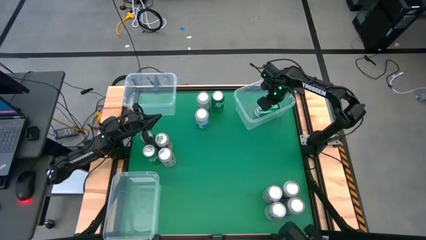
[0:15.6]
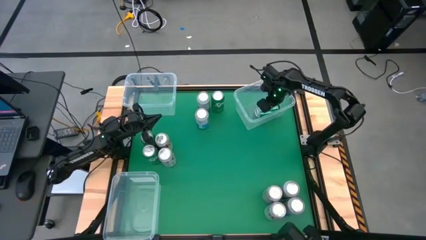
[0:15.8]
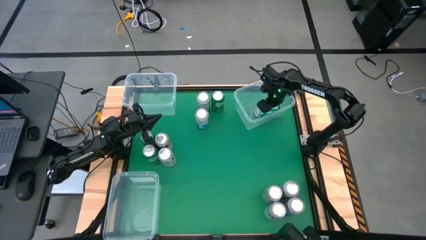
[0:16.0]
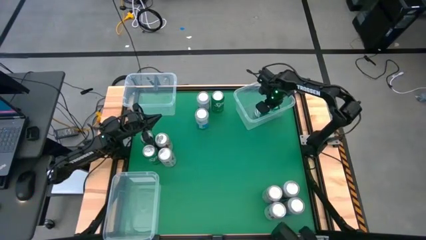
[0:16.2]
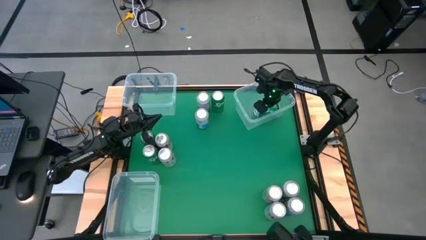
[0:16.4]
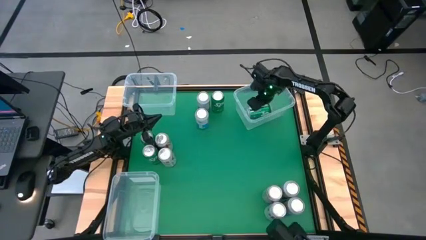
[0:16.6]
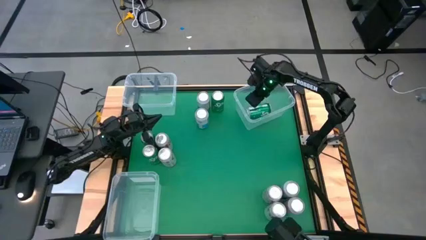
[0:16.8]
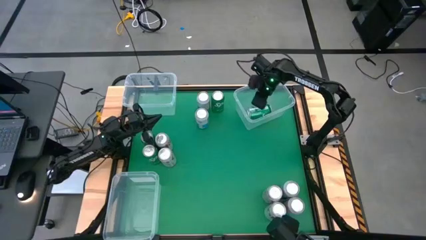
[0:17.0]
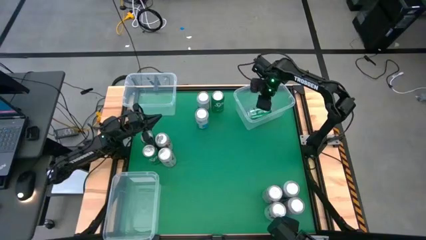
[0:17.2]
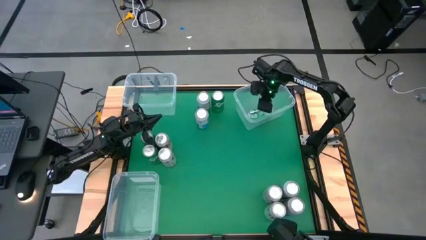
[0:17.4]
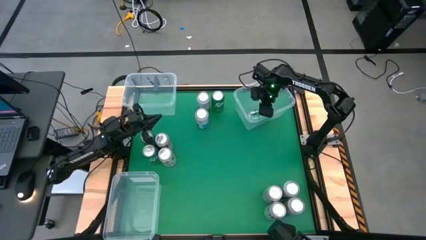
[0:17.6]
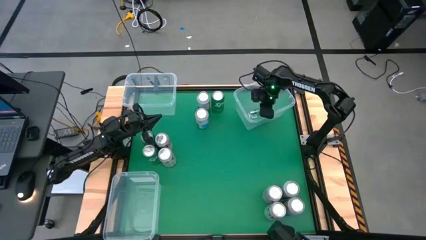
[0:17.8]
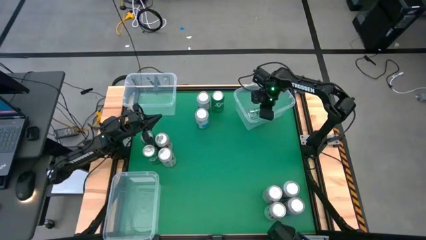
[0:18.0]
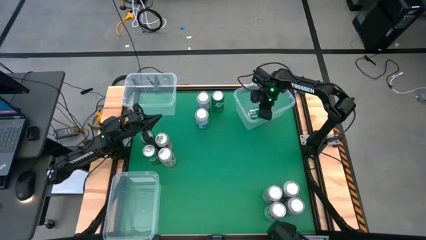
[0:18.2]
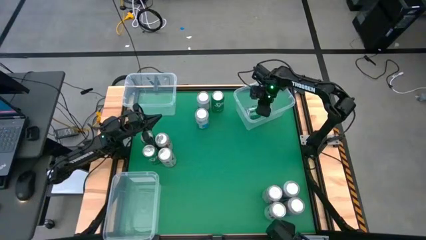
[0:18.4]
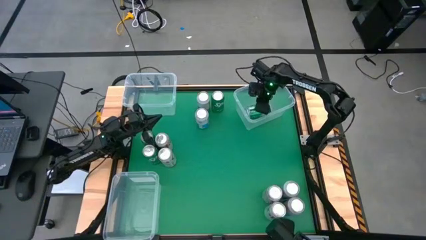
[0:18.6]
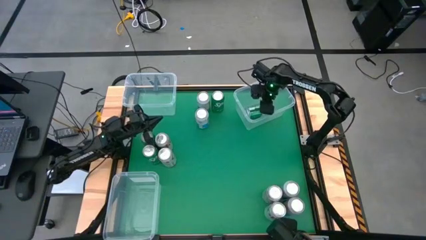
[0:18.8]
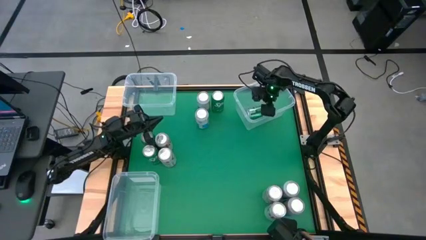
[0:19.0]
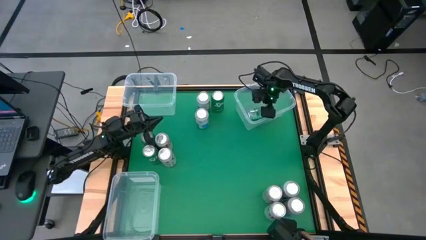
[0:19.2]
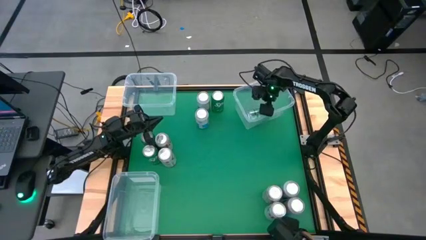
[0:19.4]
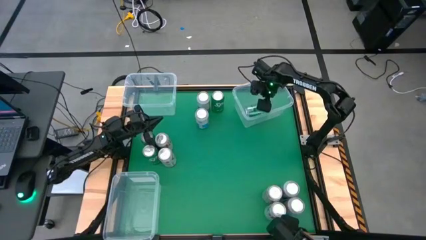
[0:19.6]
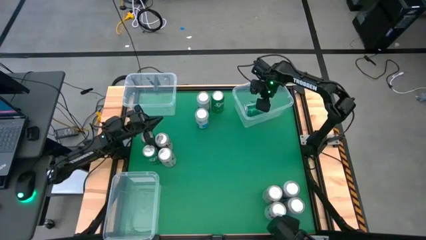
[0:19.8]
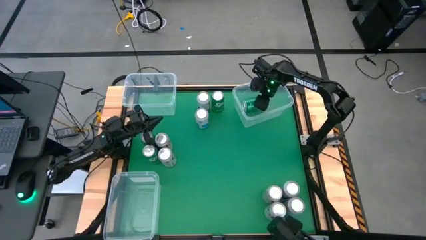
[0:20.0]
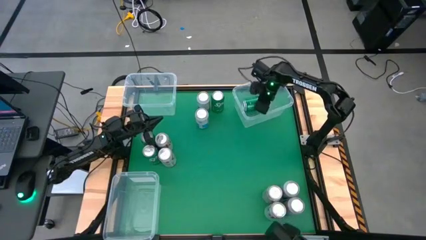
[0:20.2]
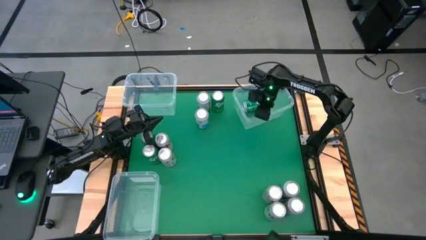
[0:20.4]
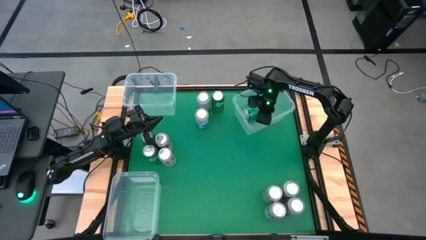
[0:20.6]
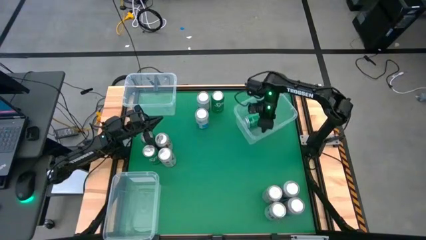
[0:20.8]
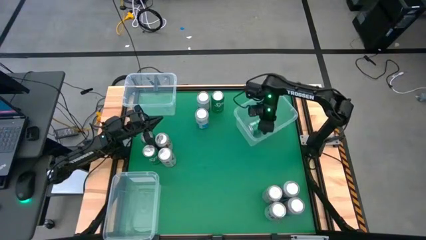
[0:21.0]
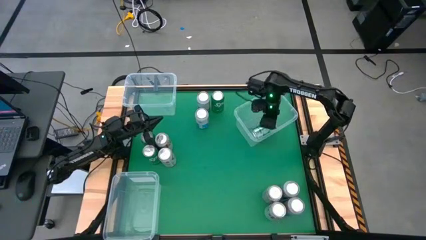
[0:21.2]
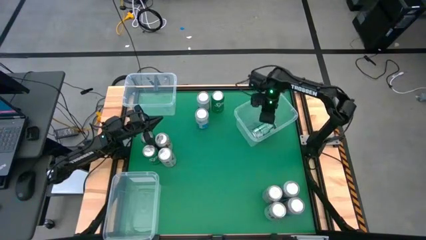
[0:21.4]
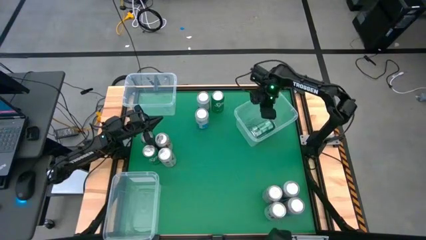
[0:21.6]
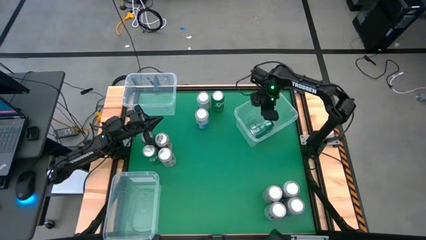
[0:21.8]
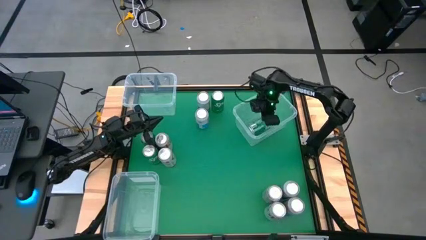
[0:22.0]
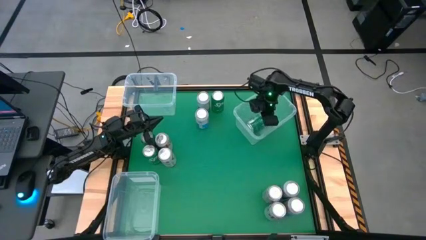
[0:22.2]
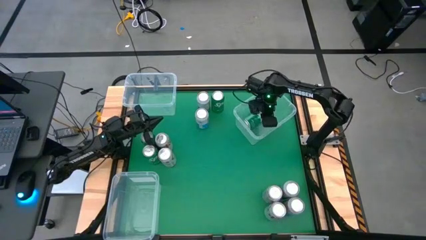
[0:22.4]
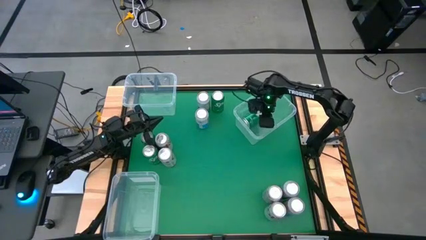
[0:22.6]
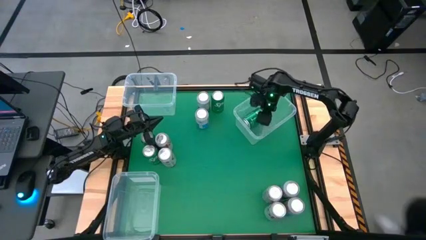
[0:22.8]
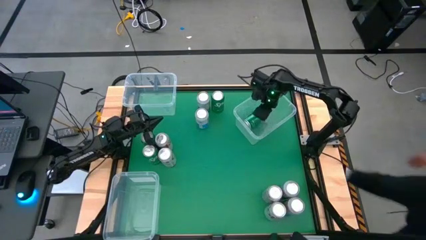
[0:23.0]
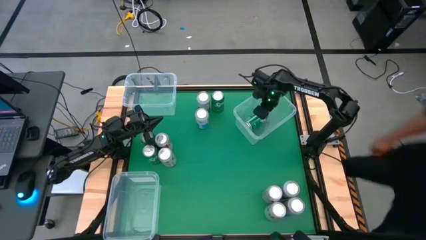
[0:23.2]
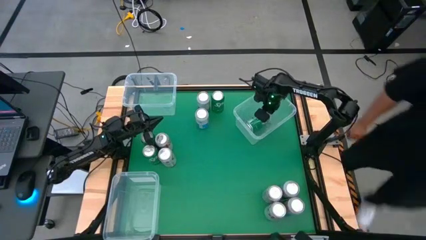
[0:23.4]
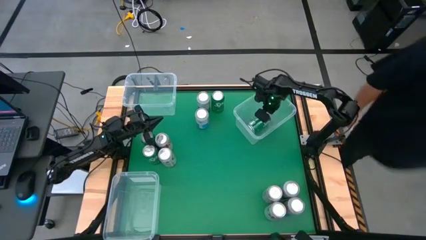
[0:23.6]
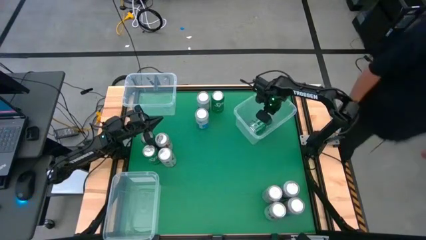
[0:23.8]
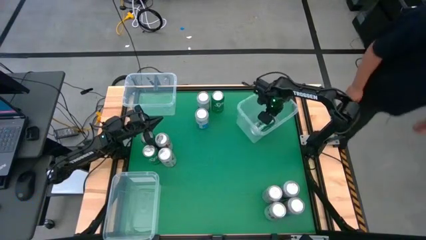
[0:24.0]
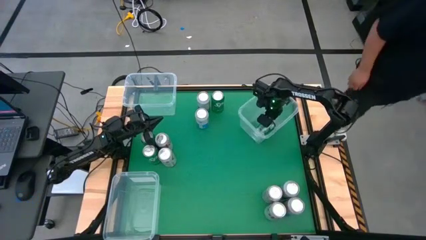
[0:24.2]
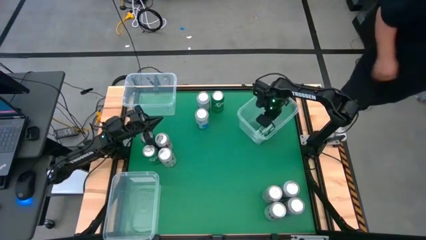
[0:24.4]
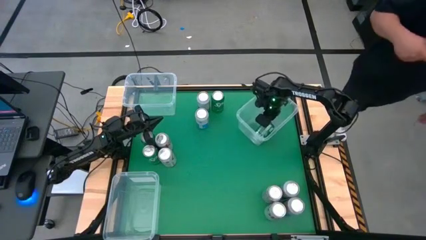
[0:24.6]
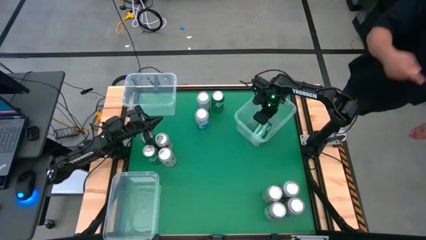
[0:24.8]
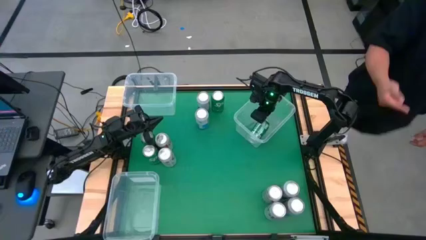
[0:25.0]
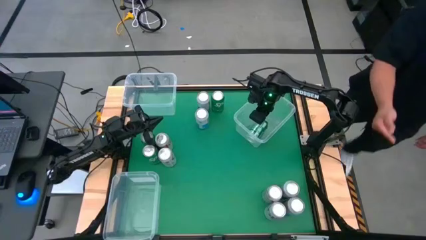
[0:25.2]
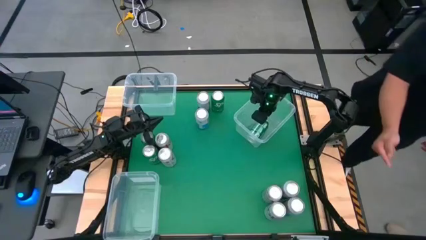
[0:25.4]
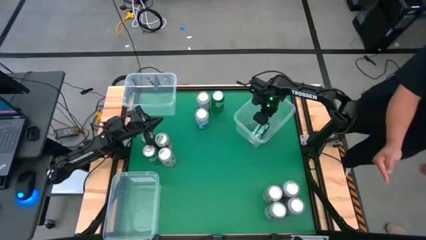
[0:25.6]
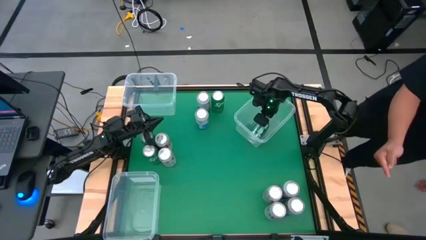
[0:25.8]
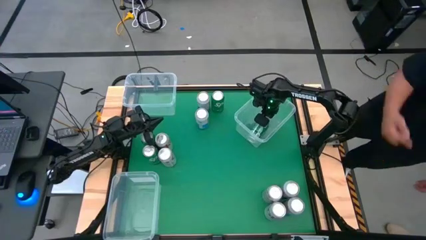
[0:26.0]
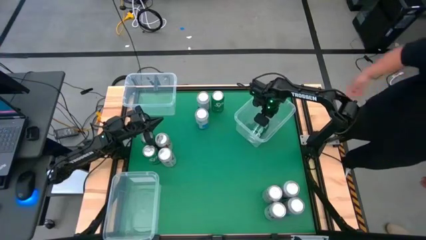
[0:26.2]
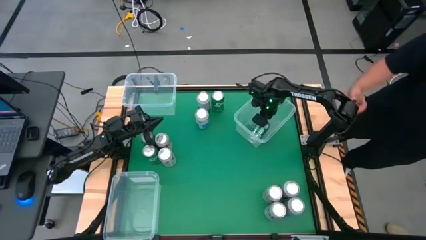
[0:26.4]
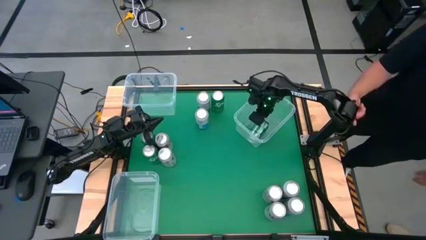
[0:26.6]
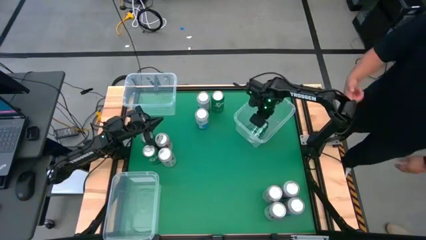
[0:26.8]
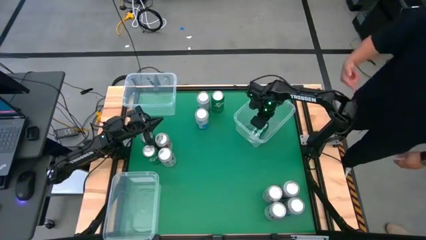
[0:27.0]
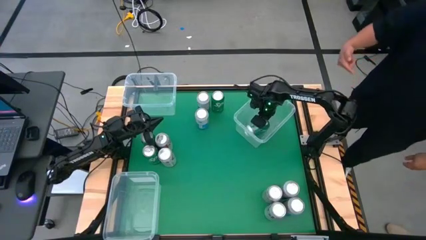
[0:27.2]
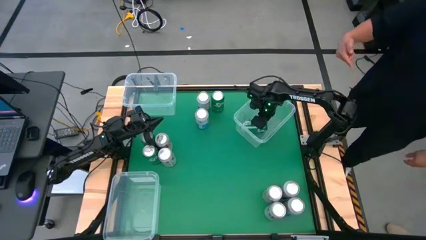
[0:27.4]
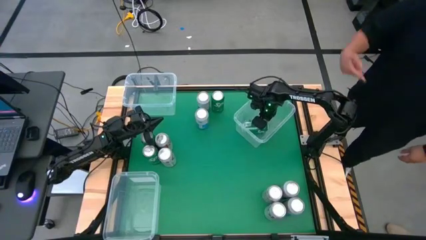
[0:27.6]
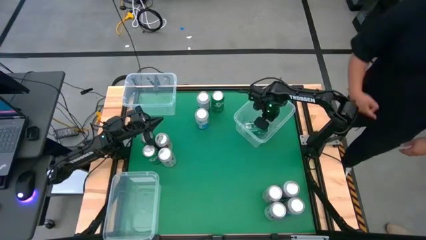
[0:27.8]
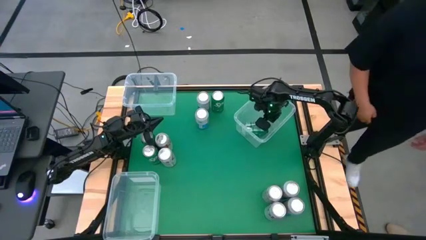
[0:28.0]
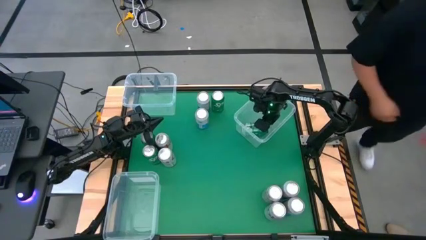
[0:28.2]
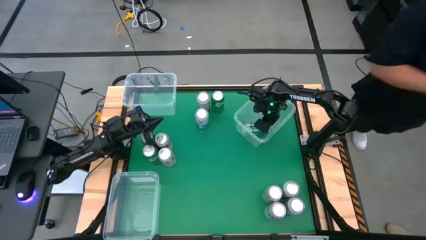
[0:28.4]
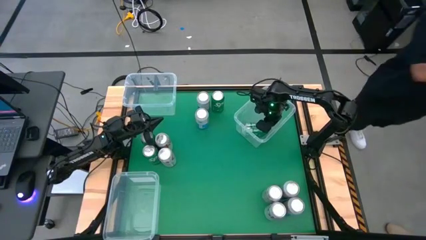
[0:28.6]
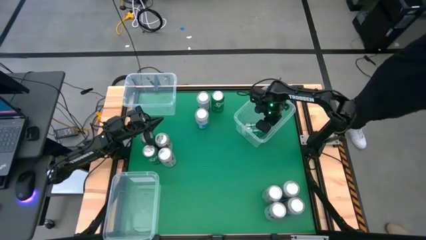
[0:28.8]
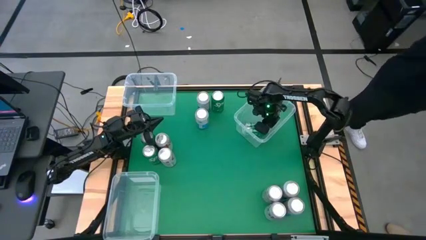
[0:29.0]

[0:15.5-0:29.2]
Task: Sort soda cans
Put the green soda can into the top right transparent bin

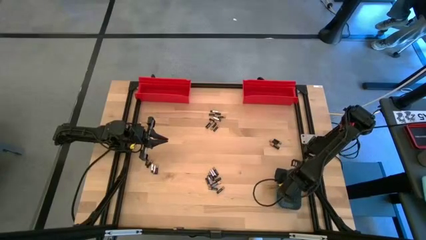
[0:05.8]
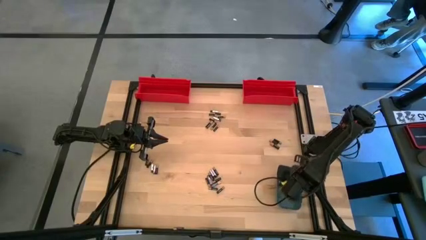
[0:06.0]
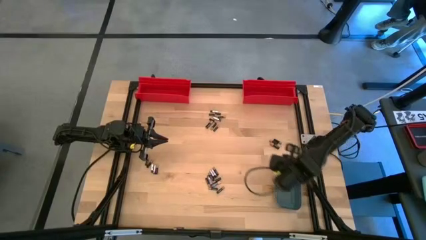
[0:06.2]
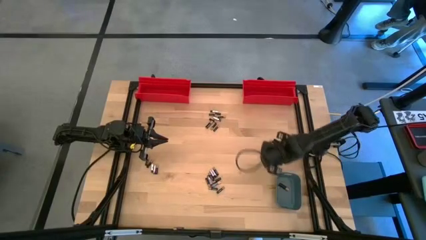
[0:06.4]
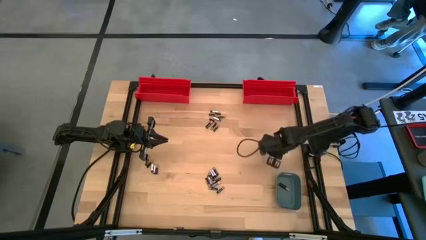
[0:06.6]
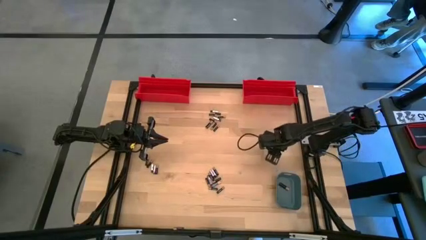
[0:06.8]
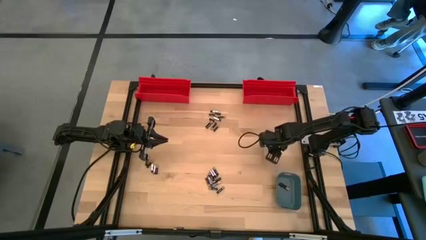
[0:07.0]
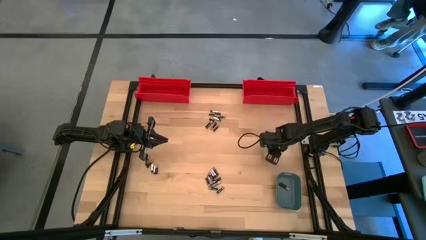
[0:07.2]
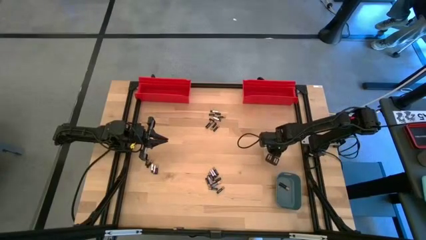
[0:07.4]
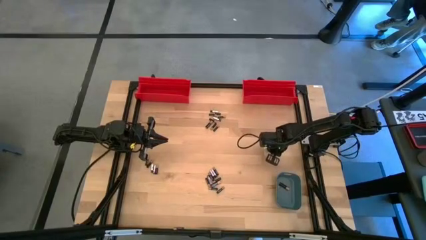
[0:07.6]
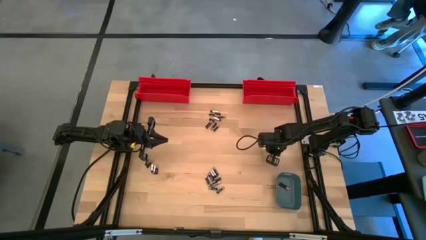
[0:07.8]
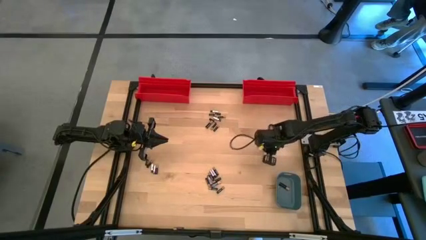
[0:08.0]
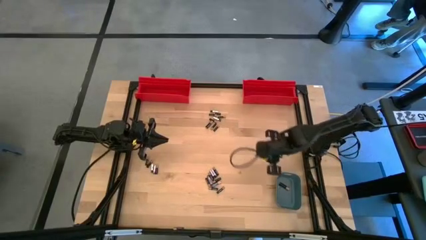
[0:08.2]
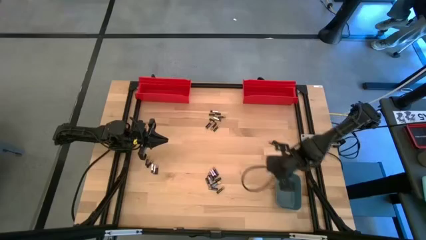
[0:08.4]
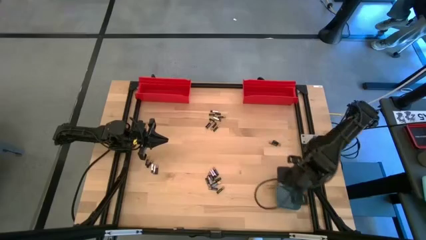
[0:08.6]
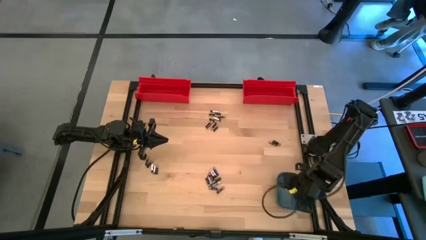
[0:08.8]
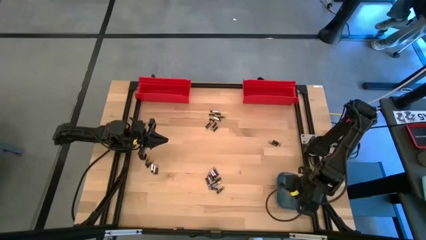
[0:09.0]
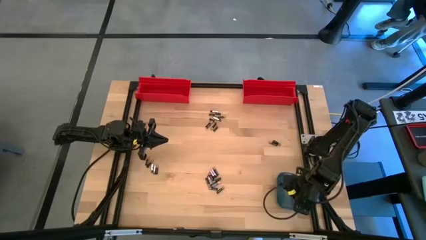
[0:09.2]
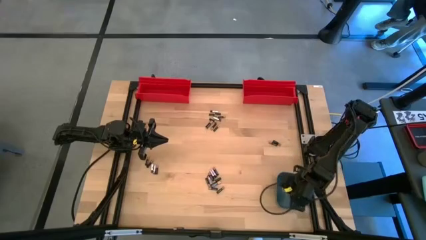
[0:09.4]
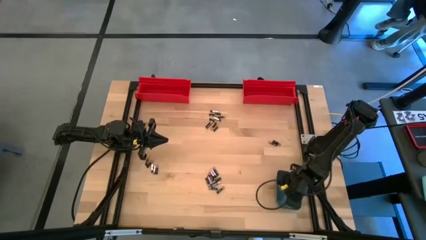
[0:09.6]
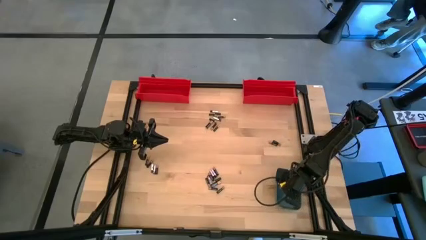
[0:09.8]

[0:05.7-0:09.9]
Task: Sort batteries
Put the large black battery into the blue bin
